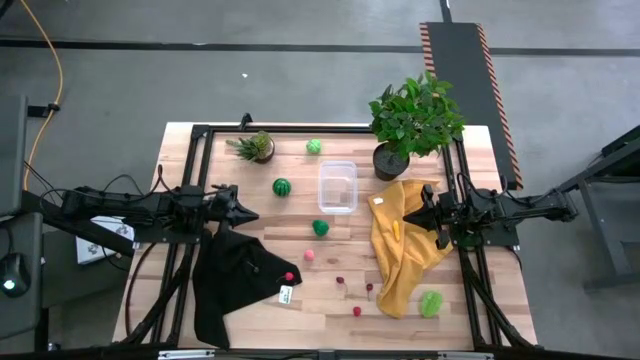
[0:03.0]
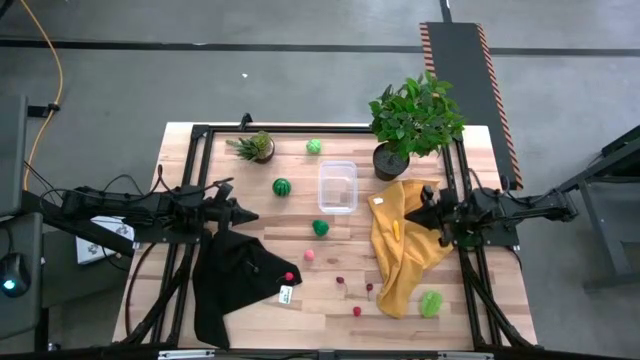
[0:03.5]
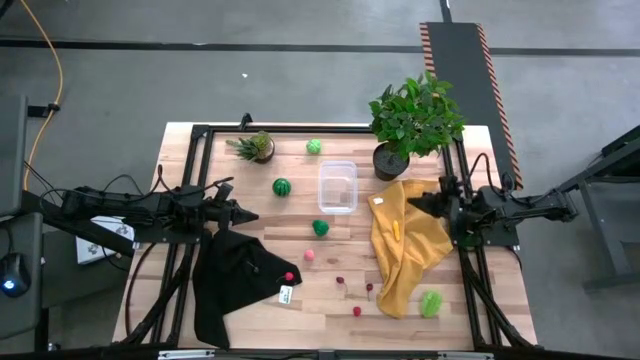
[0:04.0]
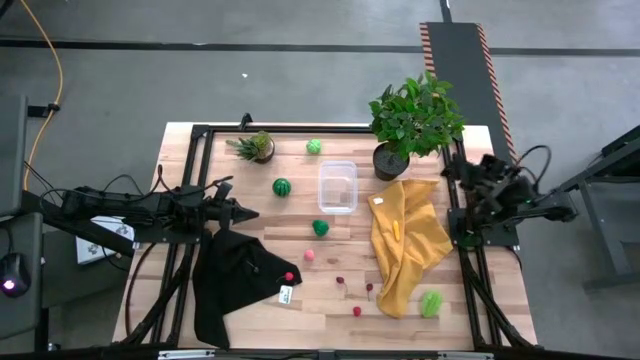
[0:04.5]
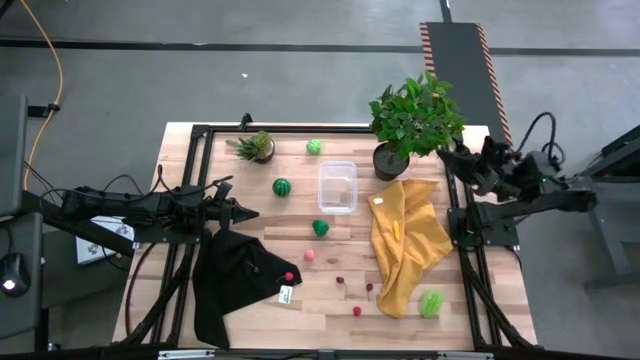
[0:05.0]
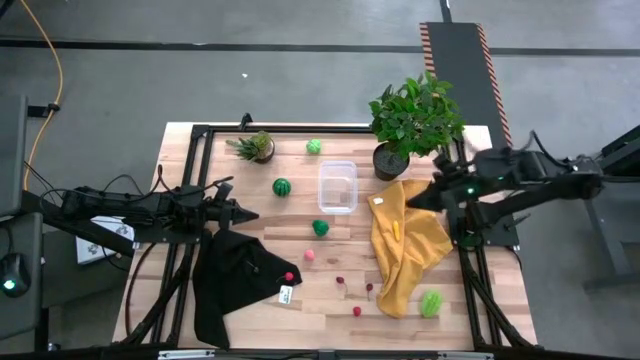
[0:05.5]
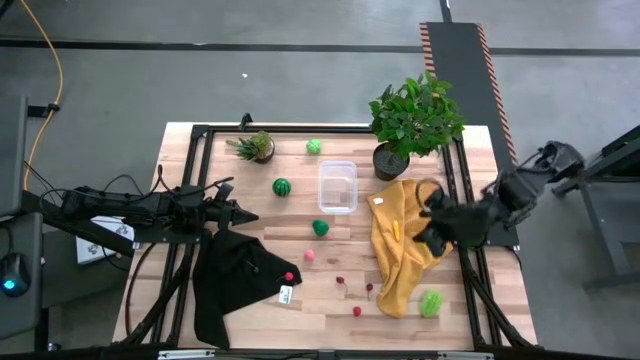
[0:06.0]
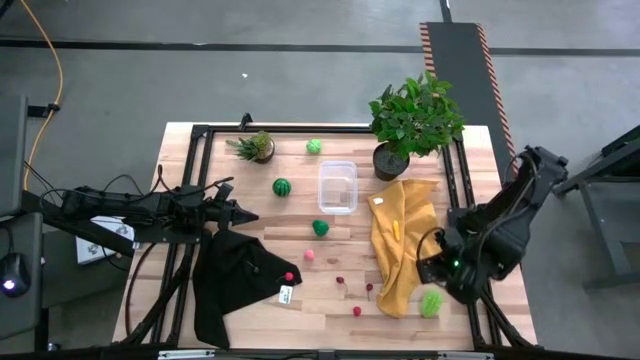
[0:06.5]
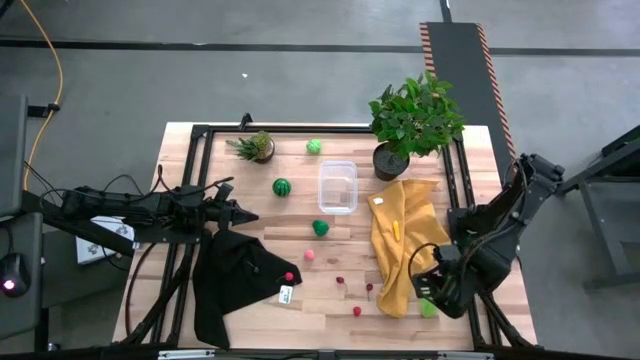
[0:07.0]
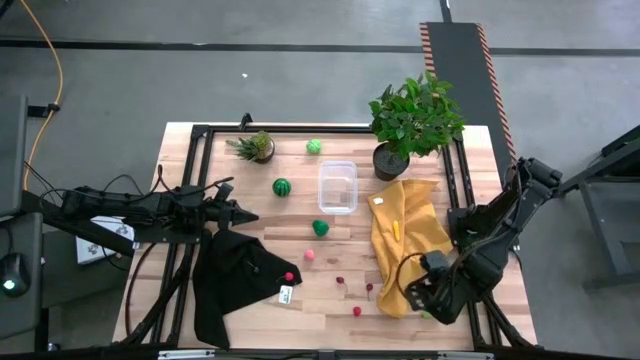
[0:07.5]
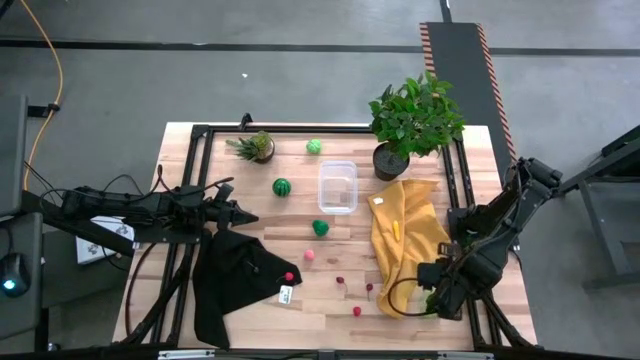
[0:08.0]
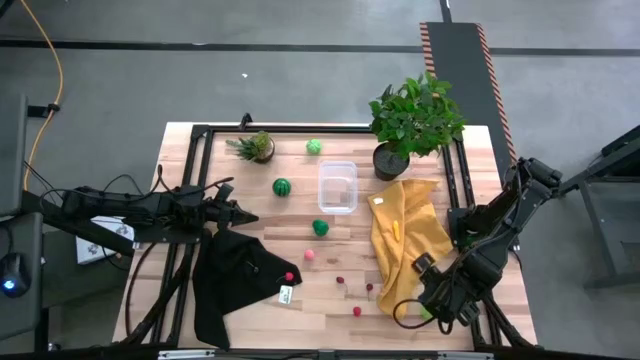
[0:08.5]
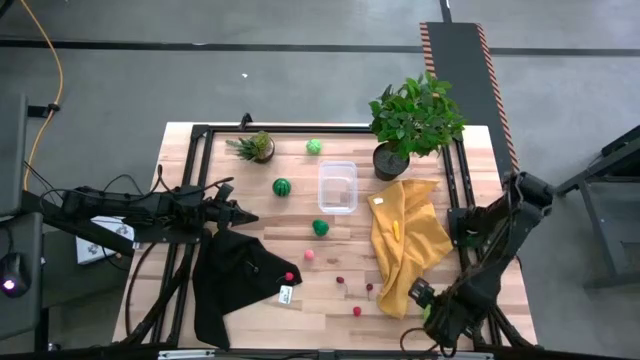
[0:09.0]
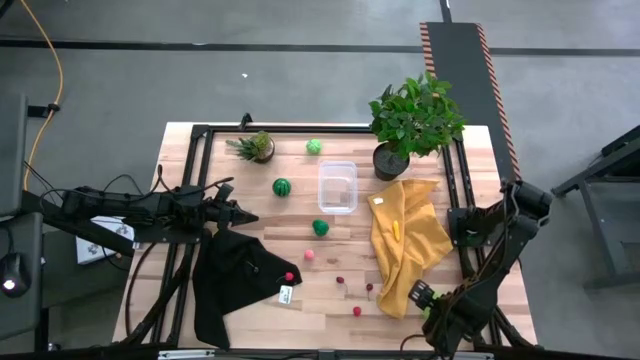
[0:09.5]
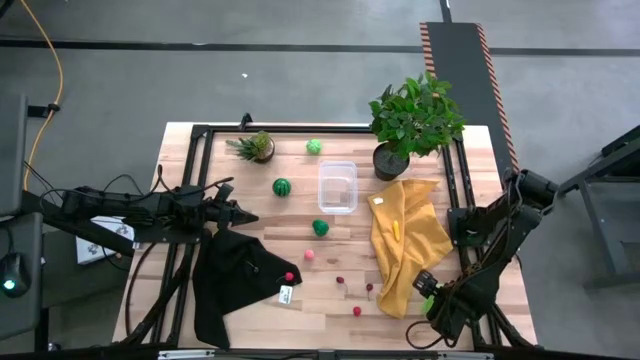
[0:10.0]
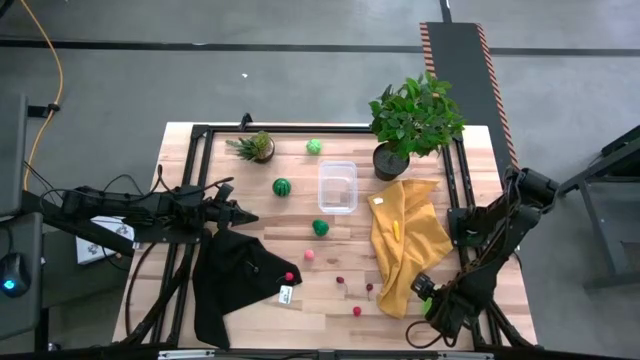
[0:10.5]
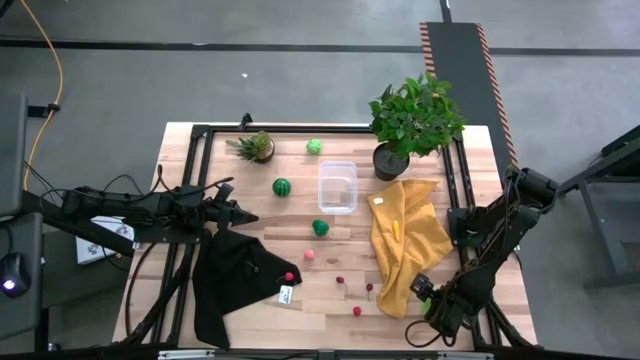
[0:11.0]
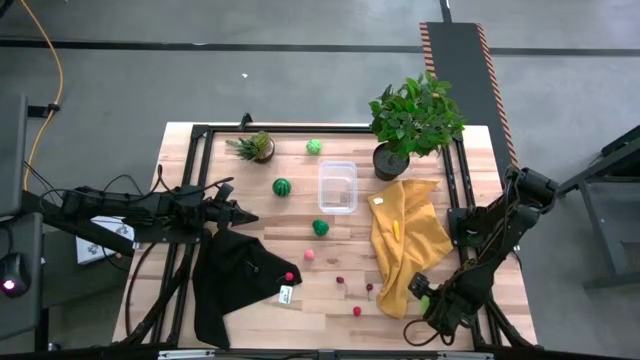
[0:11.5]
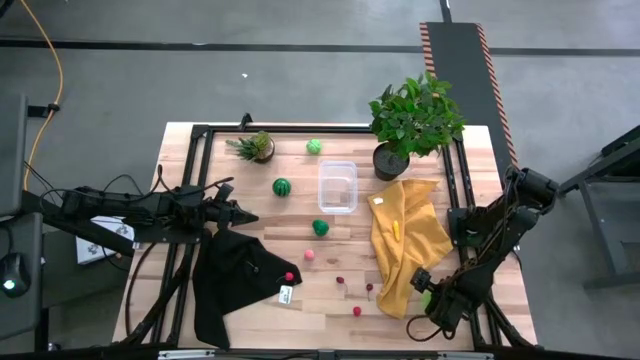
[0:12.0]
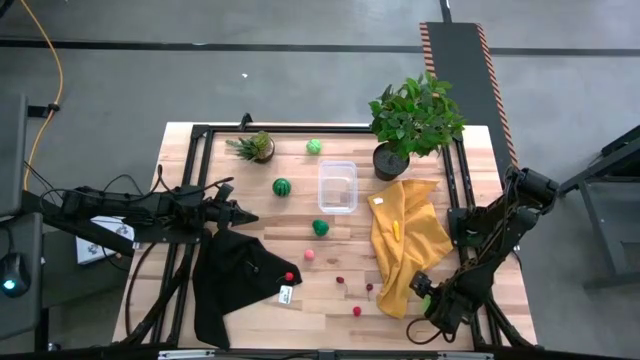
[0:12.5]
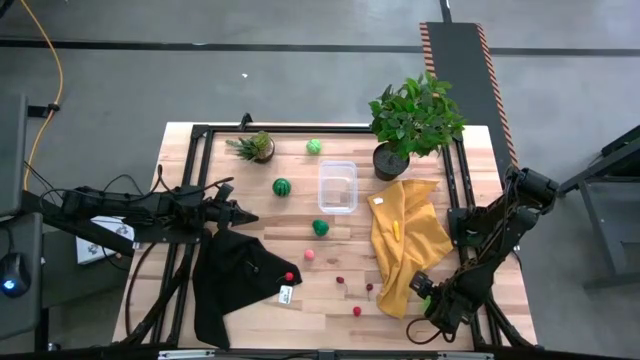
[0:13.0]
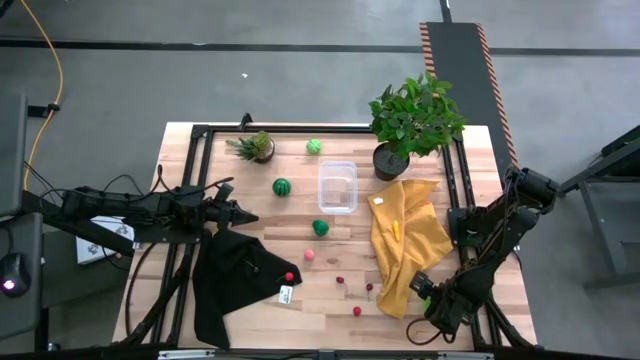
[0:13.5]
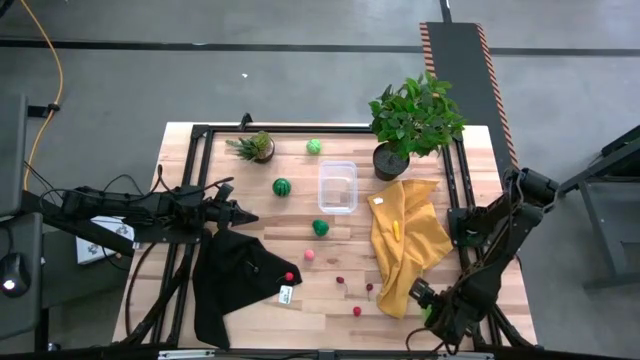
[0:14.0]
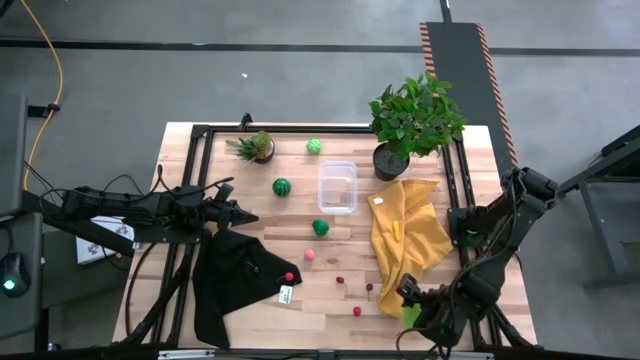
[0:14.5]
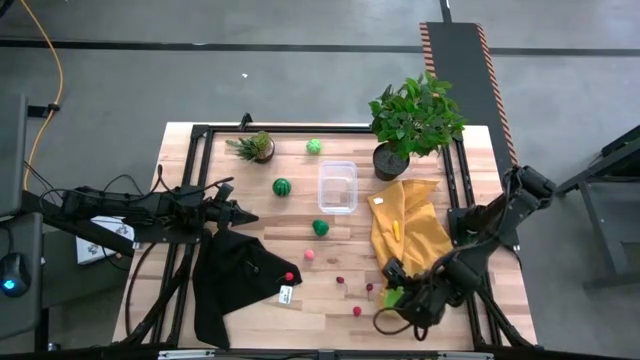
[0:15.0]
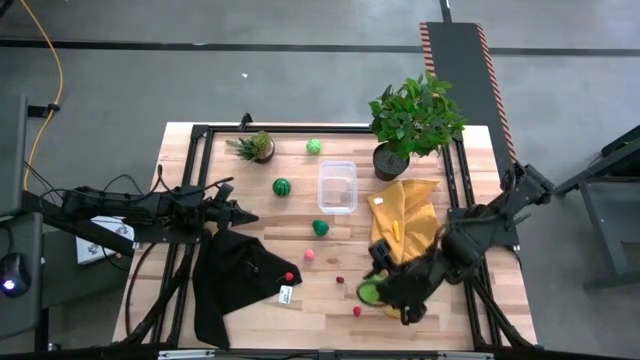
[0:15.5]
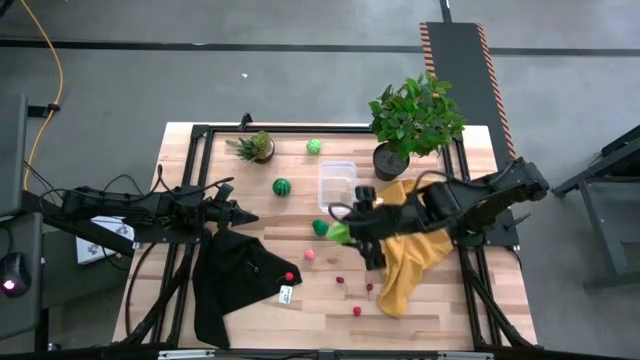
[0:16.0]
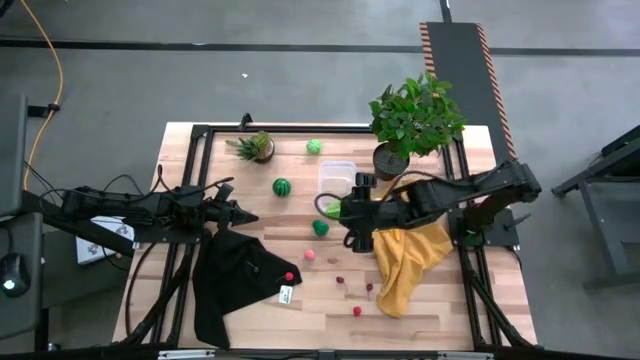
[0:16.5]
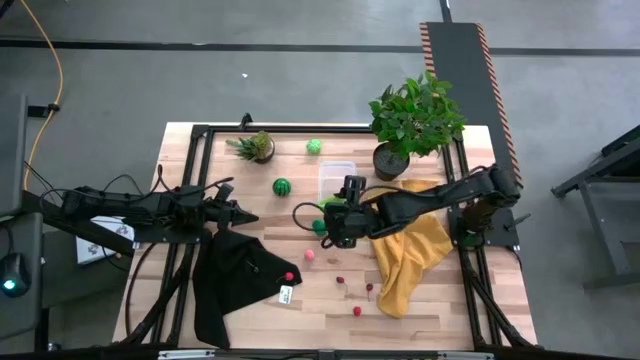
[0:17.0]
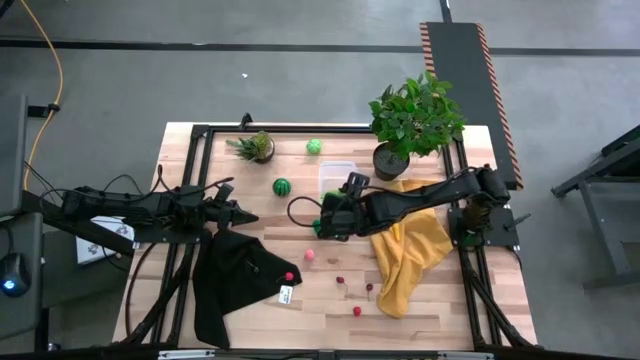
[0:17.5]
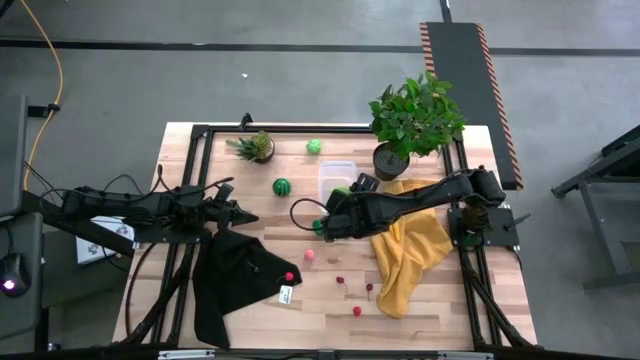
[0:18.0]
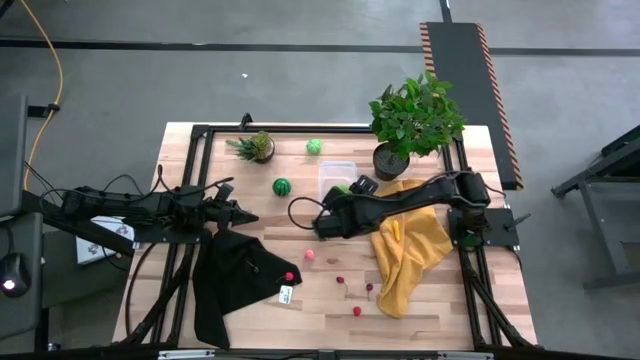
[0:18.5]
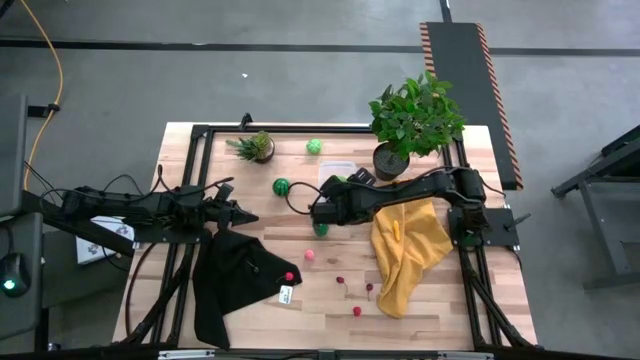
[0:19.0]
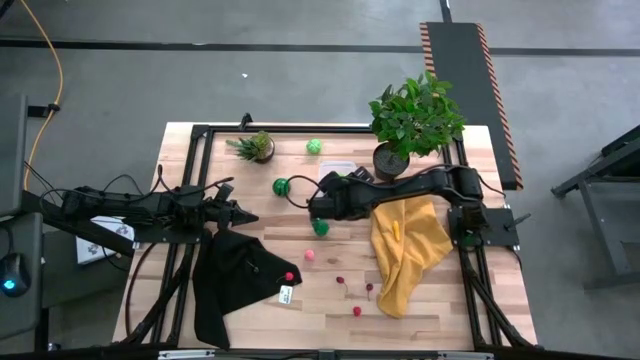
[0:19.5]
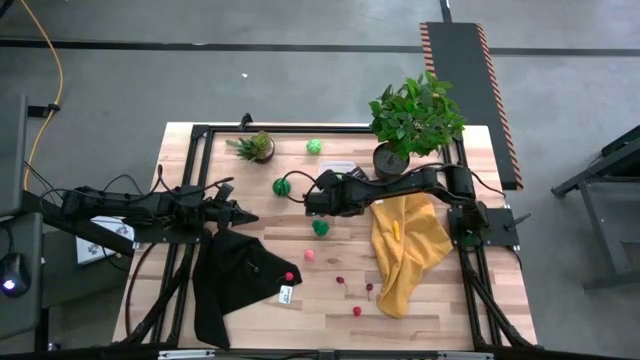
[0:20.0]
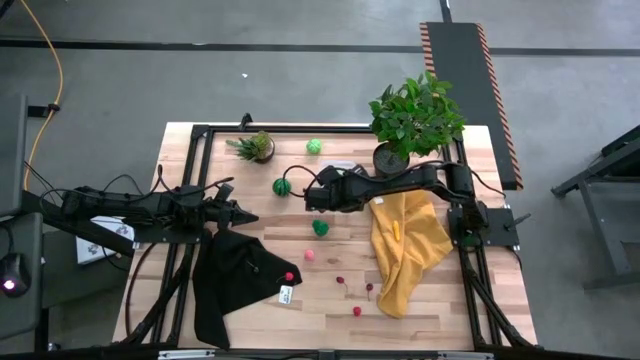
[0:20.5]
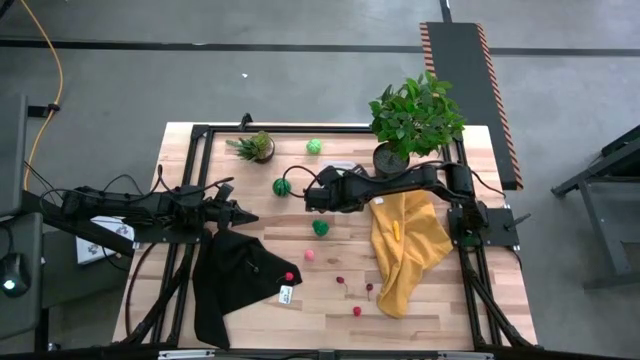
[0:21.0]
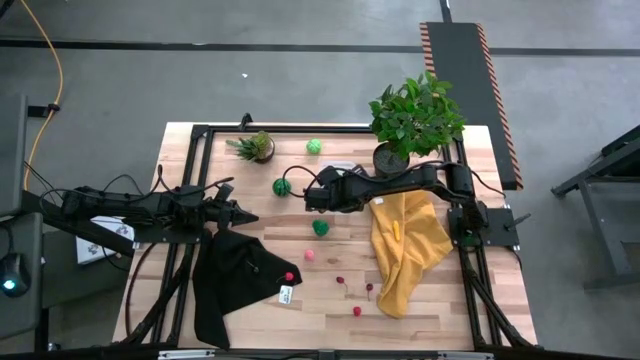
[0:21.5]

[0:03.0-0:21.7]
Task: Pick and placing Produce into tupperware
Put the starfruit into the transparent bin
